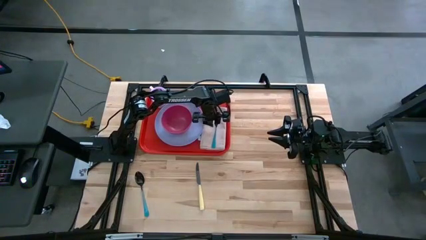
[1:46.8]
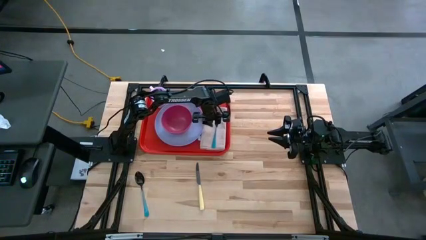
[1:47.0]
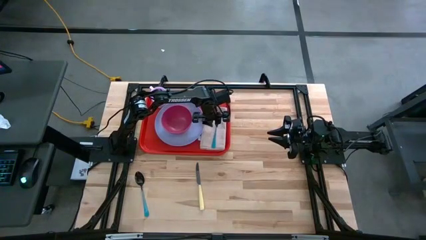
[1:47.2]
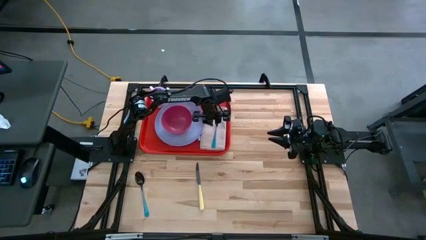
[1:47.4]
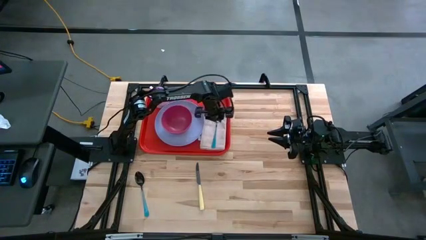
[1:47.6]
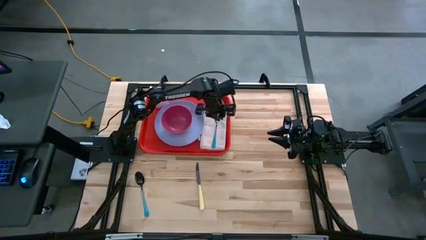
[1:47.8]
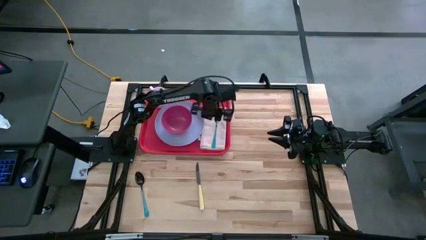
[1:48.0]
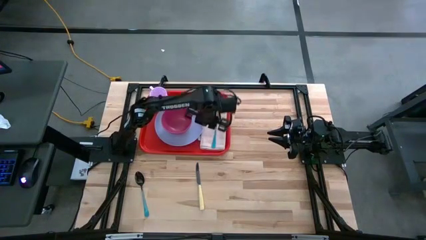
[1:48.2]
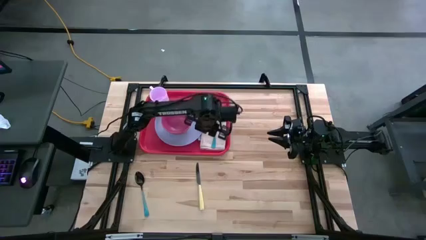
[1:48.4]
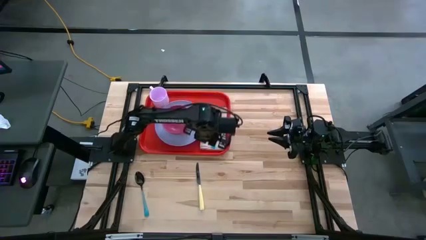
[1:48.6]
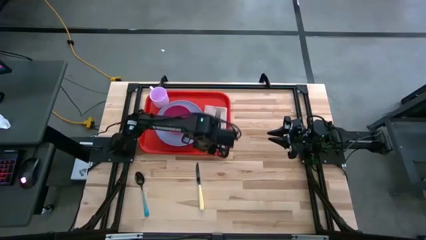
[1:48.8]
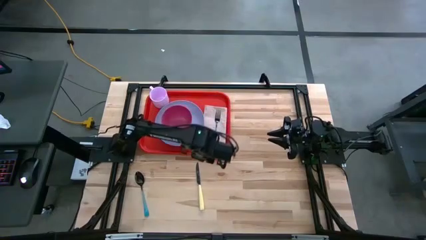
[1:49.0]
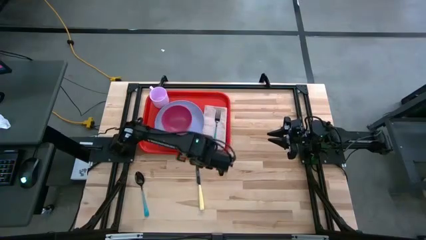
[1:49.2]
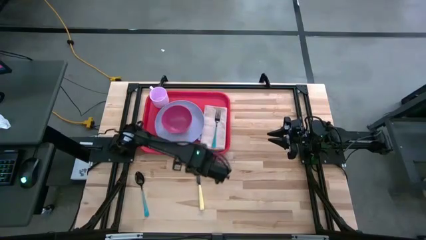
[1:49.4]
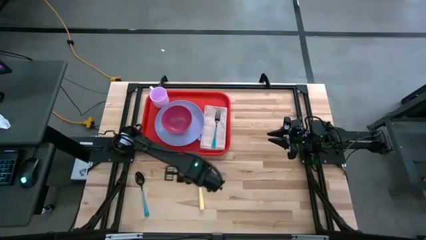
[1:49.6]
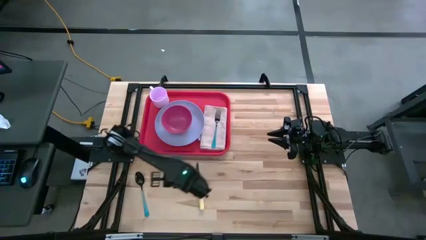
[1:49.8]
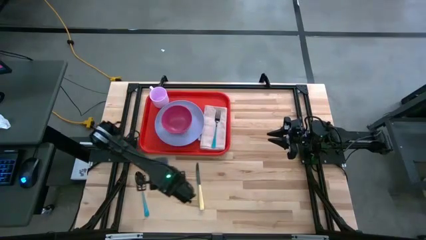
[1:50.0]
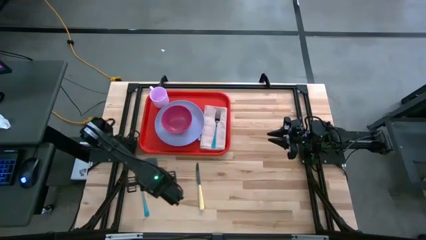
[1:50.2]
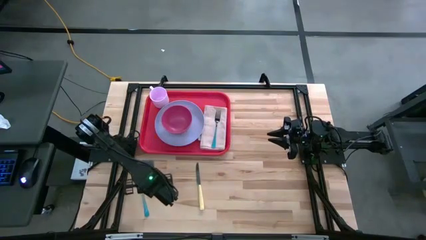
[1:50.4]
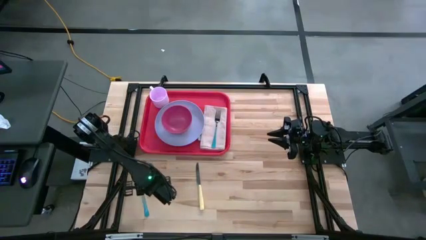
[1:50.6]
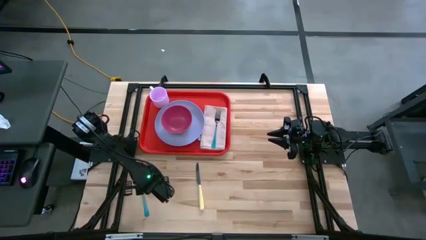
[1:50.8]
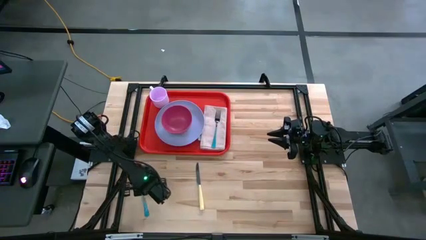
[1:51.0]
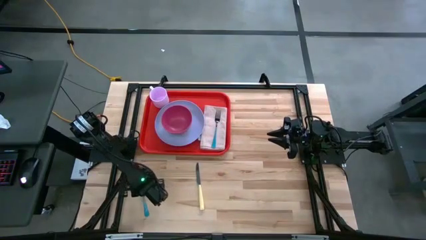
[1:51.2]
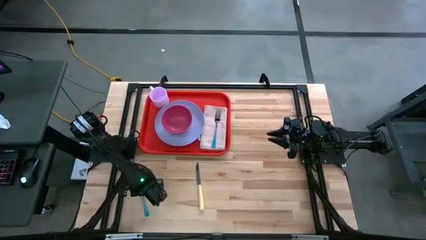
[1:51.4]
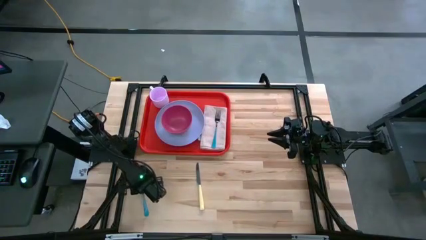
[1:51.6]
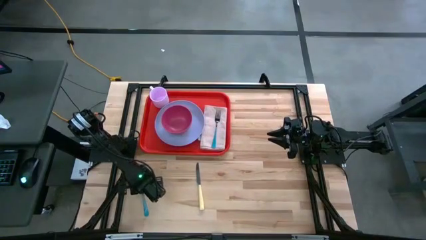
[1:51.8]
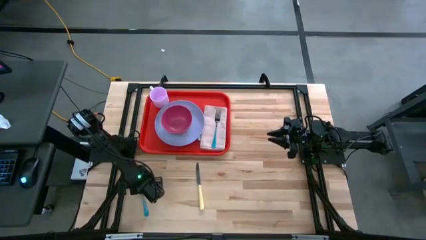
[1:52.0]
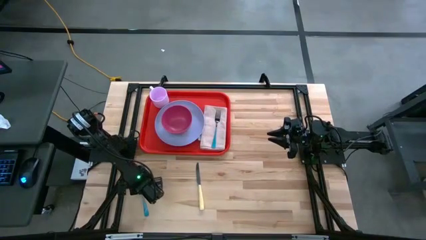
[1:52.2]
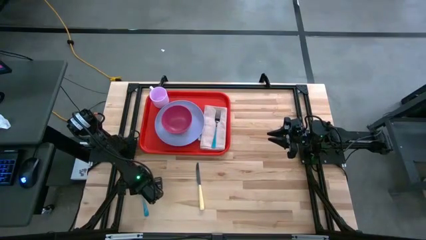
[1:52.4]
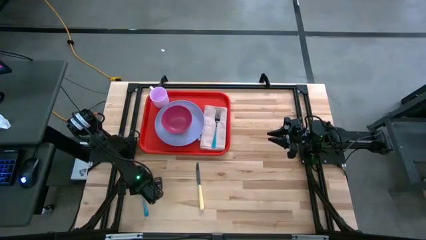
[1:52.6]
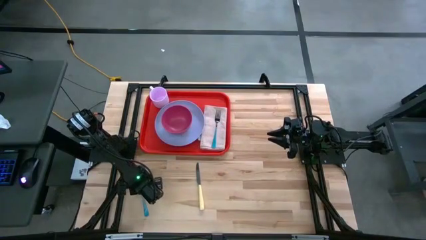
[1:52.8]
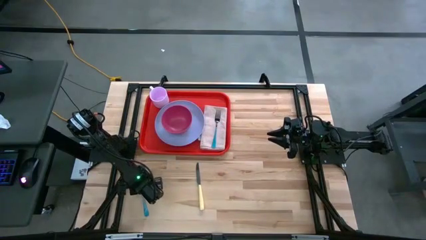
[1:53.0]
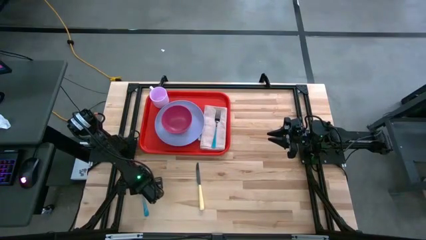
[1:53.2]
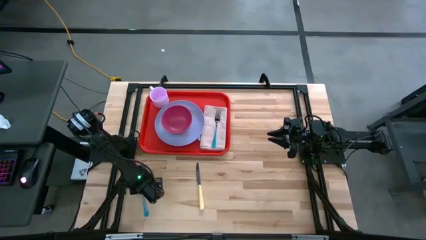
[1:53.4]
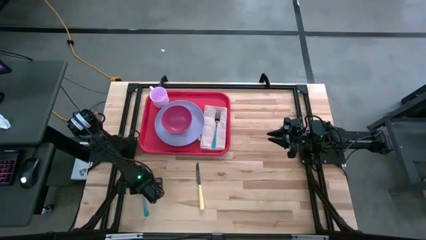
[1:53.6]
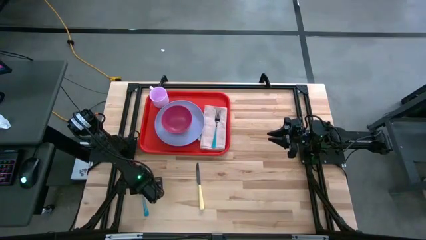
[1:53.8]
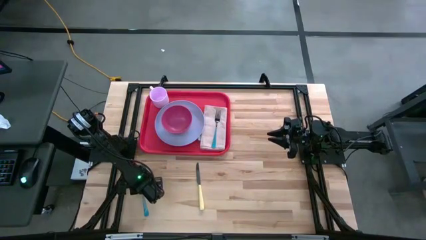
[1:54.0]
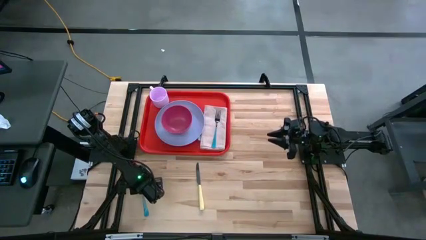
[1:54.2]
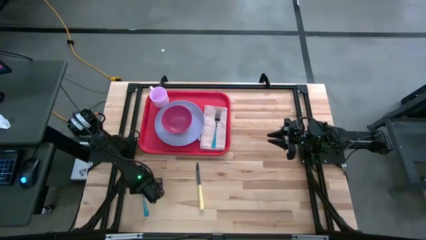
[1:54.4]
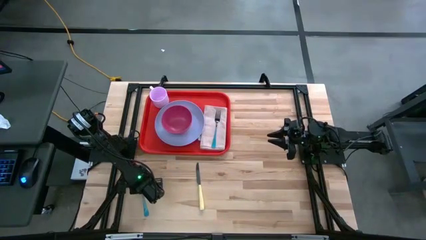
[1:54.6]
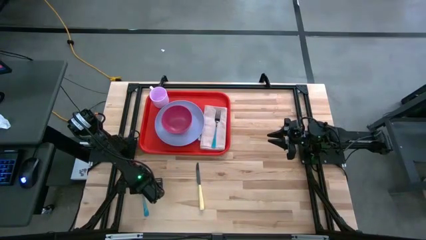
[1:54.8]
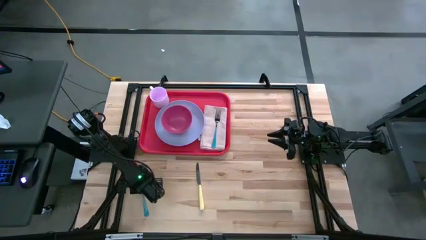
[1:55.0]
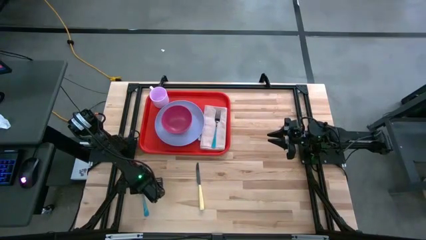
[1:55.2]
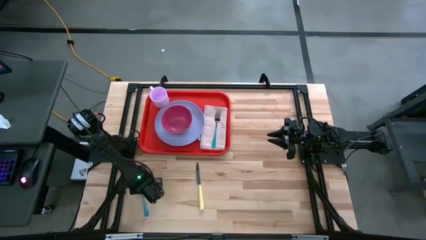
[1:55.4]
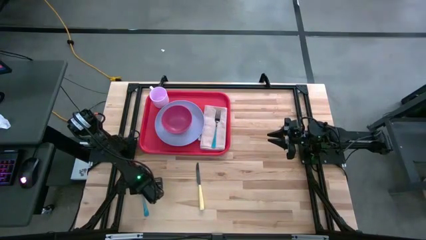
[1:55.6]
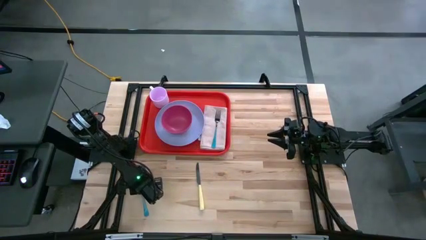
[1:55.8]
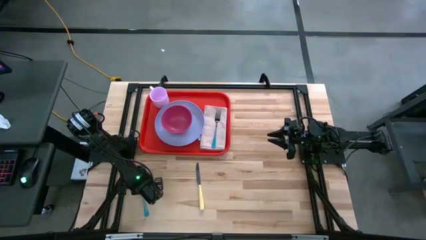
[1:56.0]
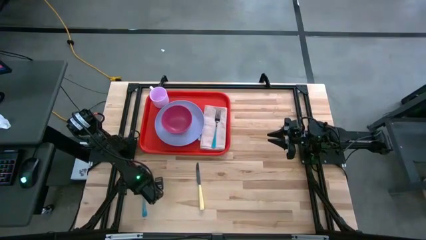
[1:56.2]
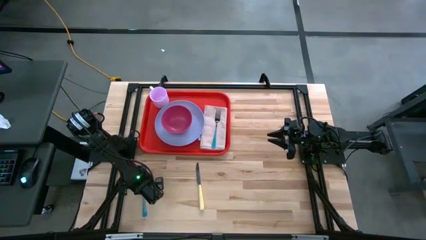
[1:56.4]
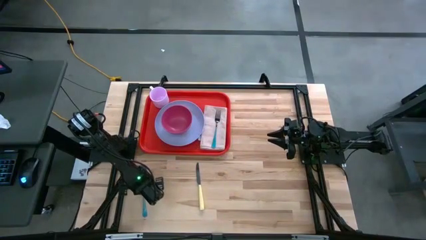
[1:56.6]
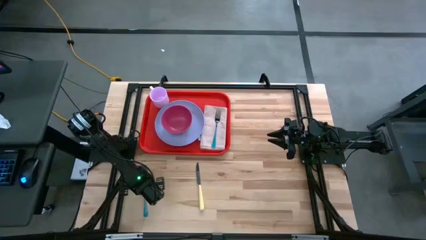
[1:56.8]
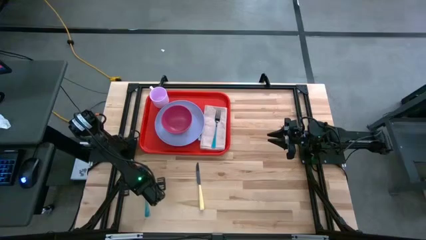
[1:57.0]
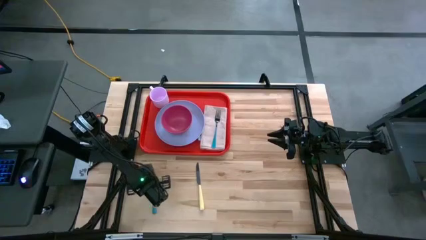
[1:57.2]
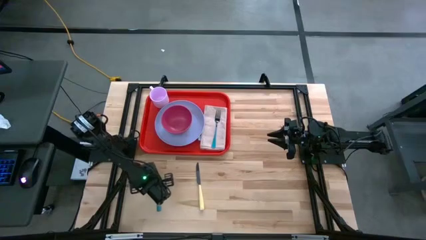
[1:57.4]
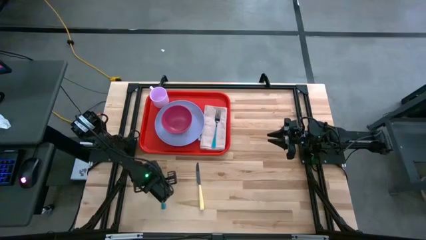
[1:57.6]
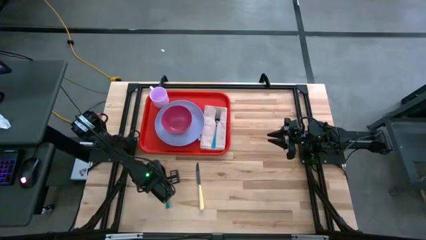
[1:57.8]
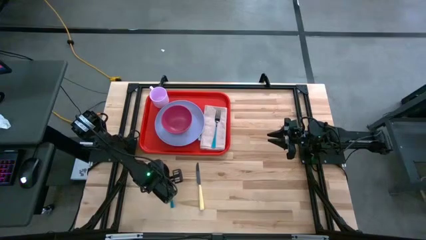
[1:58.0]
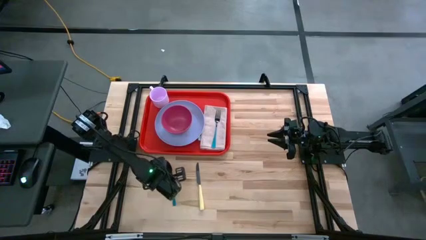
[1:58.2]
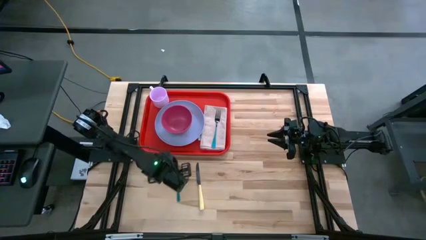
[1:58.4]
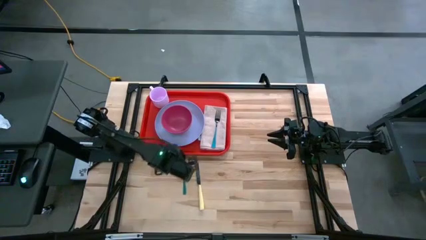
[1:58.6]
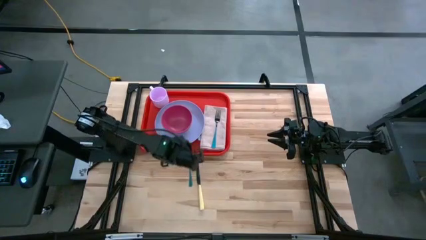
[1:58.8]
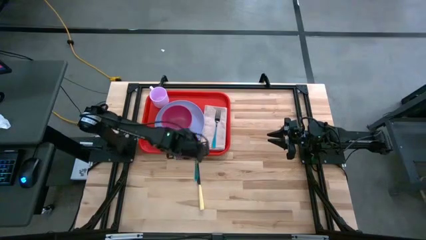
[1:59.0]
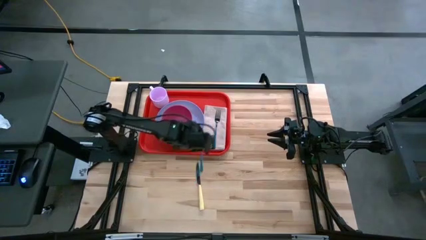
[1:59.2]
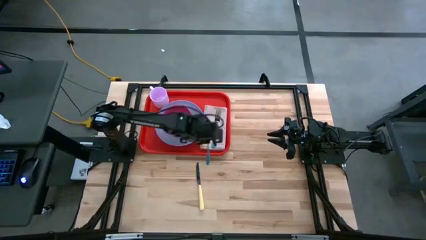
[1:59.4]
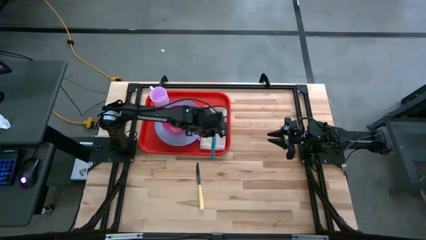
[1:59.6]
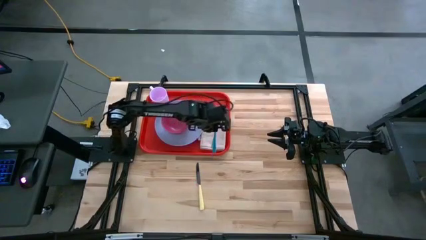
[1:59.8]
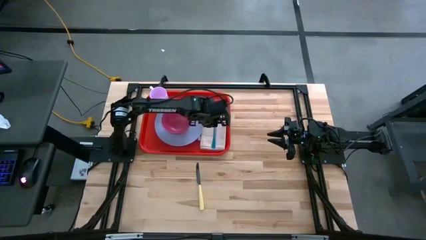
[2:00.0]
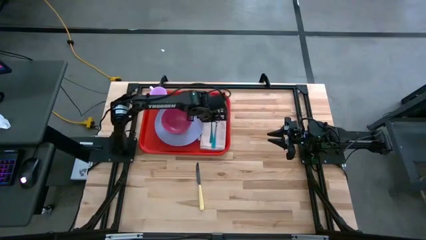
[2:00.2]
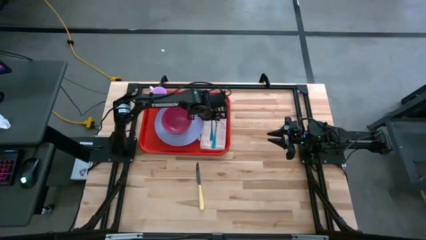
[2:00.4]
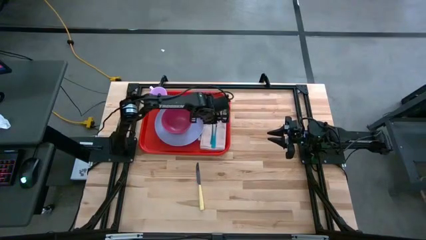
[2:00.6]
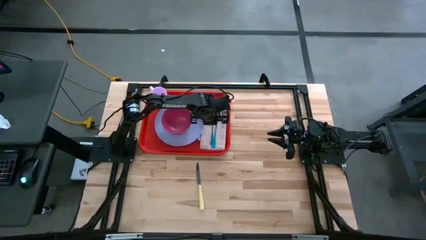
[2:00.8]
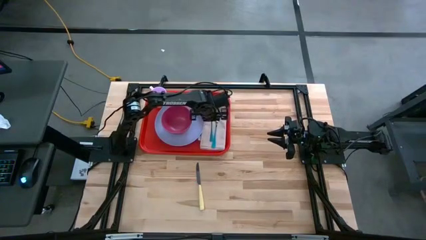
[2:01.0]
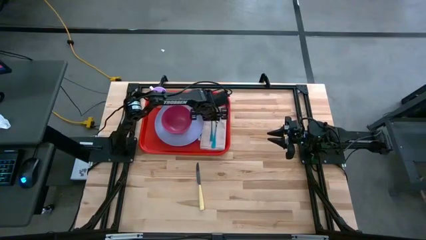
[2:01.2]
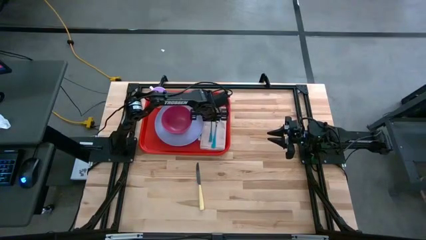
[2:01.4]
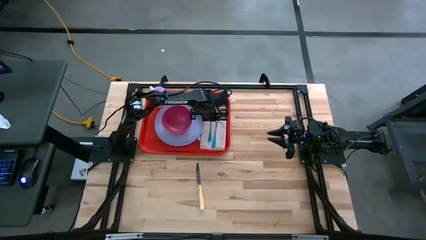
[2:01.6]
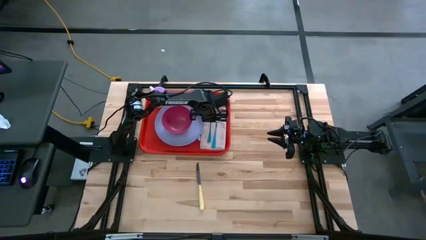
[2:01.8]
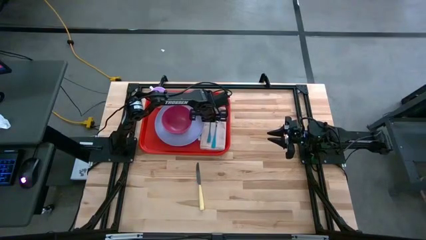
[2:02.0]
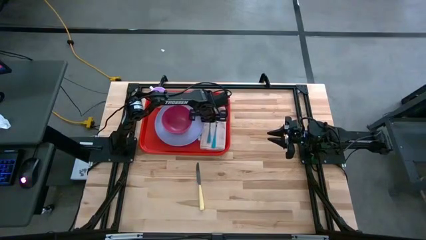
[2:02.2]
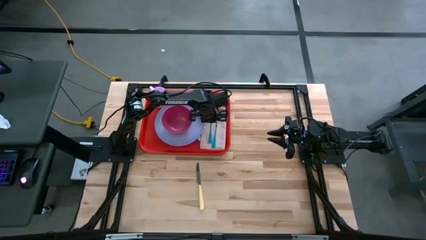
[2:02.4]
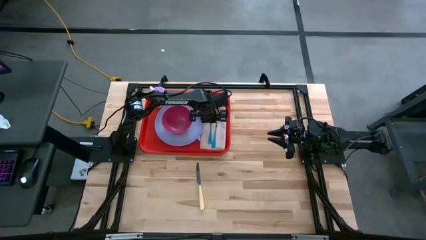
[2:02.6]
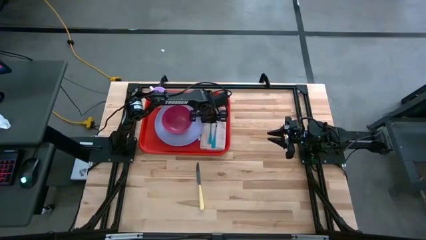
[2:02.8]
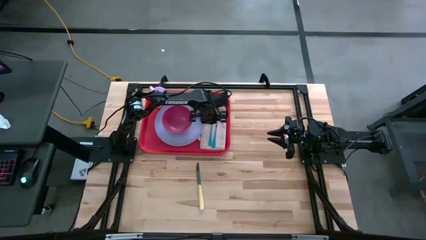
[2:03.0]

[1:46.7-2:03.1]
Task: Set up tray
Put the blue spoon on top of the brown napkin on the right side of the violet plate on the red tray
